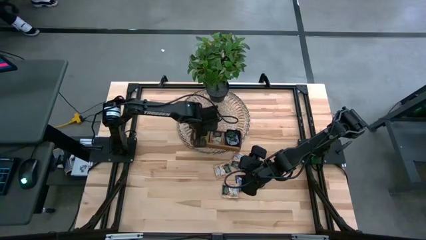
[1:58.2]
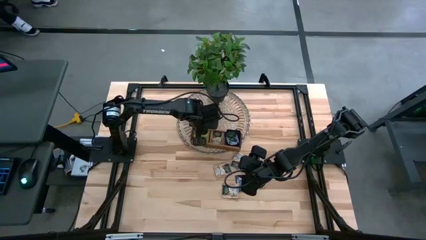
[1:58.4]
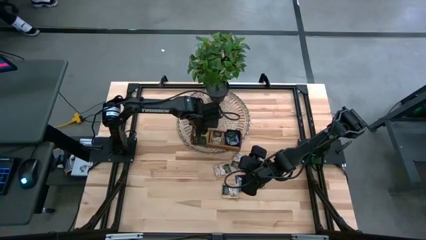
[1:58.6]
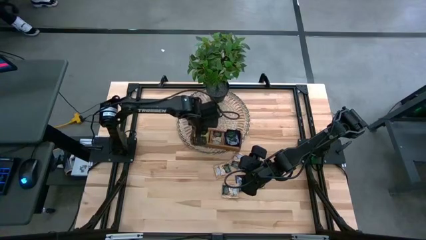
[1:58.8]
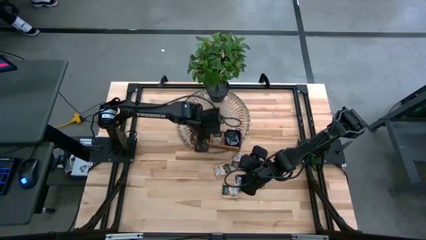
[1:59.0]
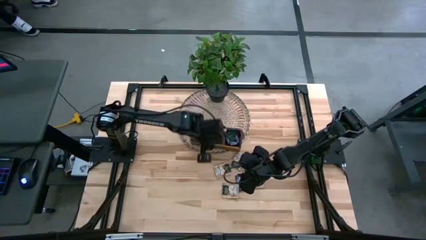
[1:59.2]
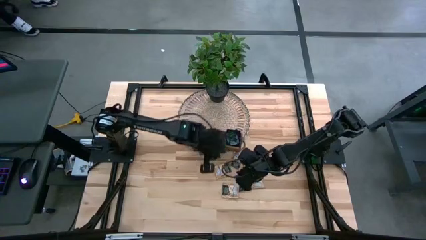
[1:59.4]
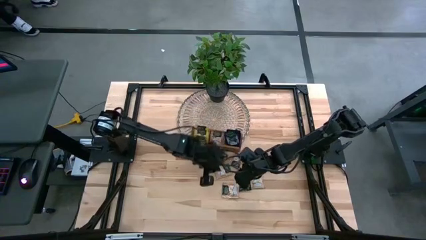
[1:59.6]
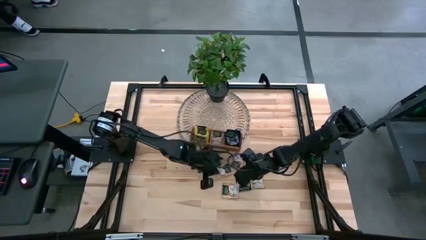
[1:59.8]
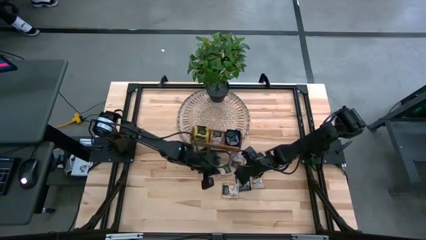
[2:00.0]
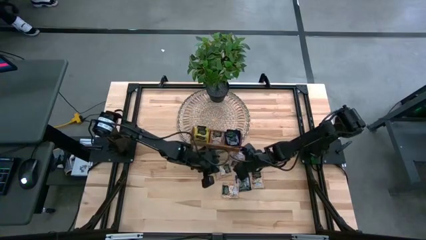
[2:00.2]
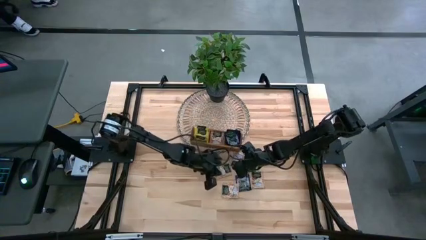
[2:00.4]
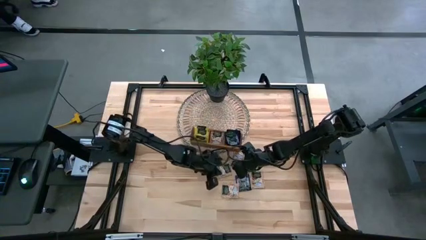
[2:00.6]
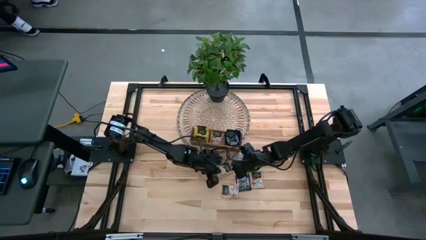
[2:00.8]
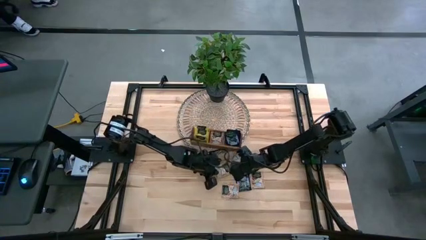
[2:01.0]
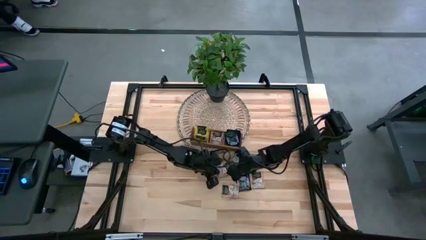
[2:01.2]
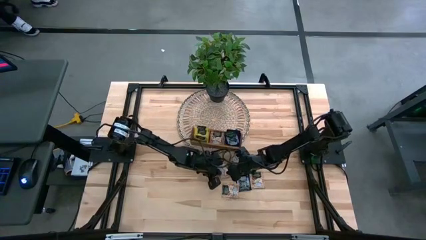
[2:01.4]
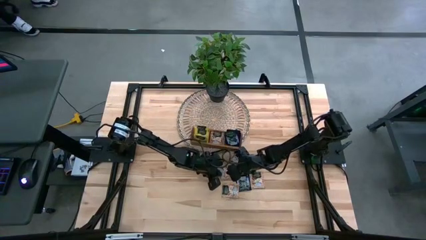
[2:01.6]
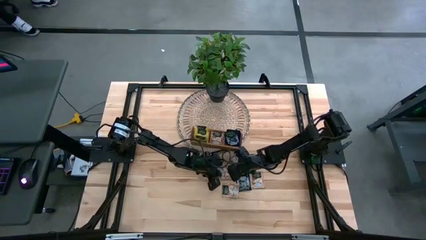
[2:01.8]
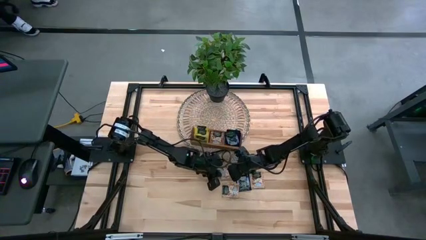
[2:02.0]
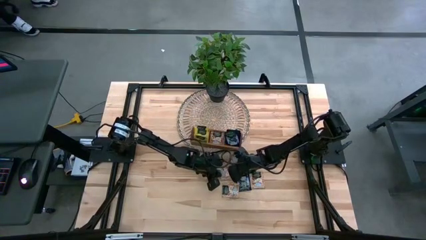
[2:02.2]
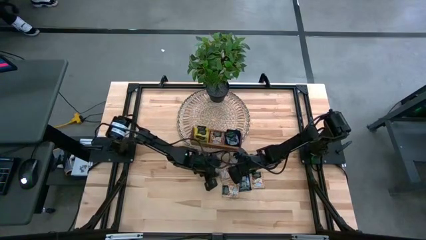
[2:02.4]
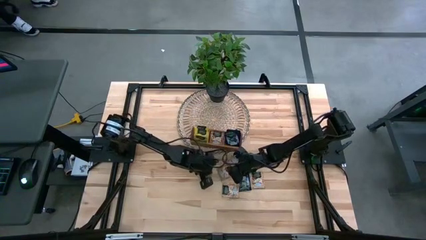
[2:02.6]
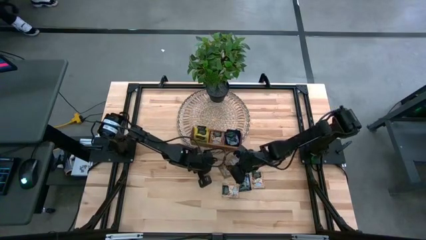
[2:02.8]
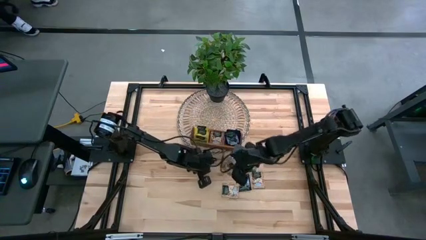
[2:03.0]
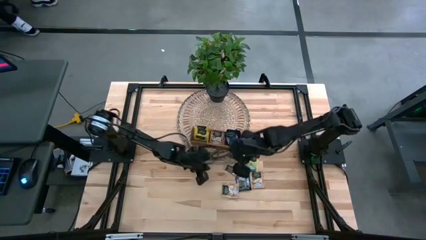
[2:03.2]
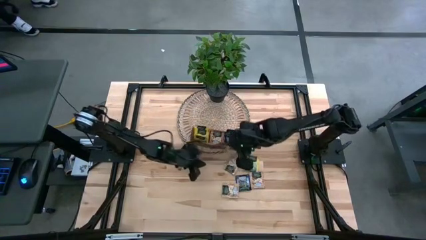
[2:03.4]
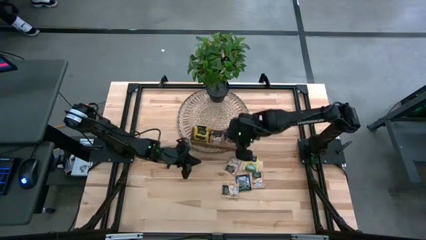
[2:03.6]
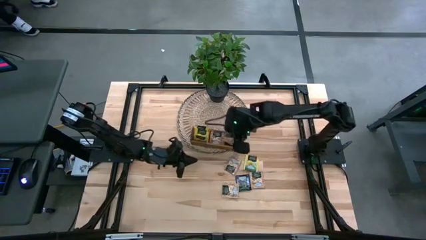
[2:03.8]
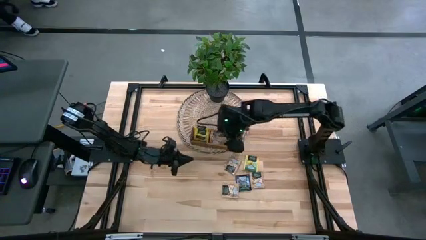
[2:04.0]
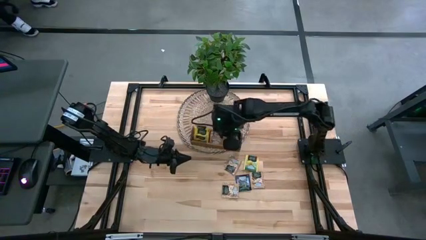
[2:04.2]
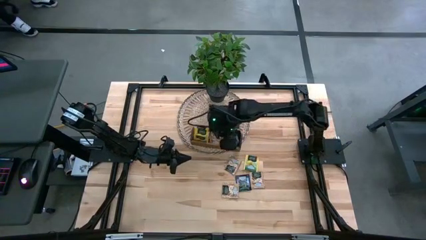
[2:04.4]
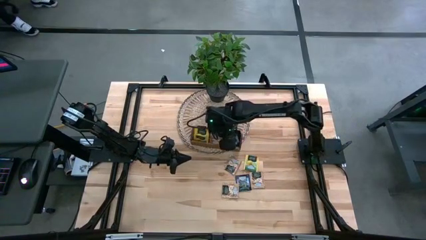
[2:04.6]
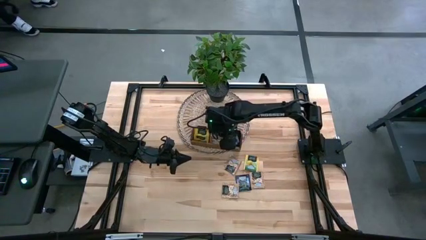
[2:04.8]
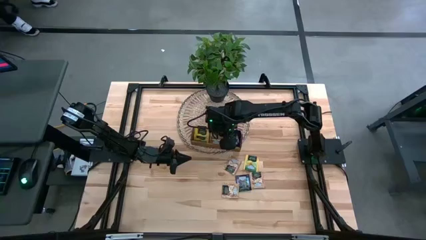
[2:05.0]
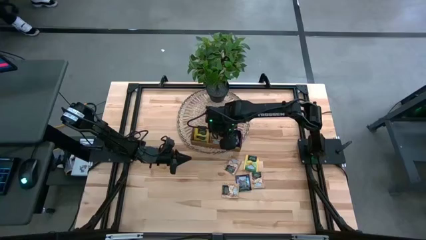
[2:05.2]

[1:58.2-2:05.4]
Task: Pick & Place Tea
Put the brown tea bag into the middle section of the wooden organizer

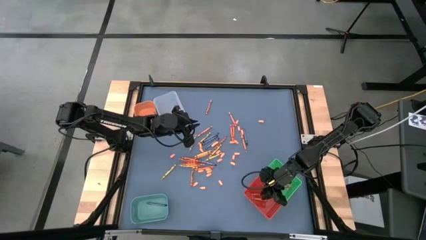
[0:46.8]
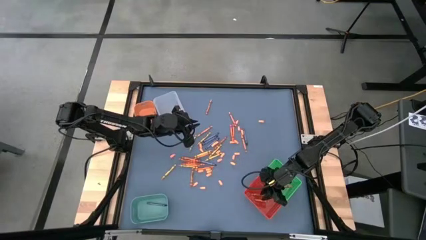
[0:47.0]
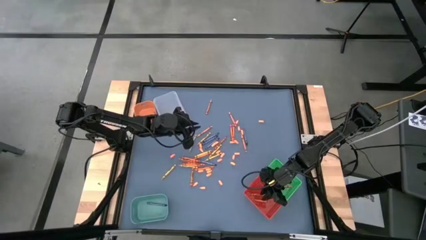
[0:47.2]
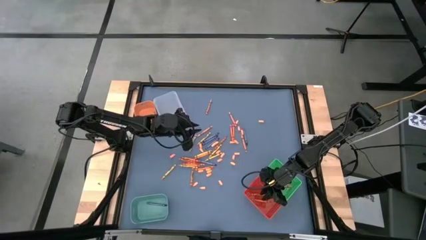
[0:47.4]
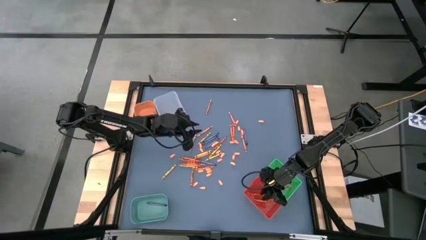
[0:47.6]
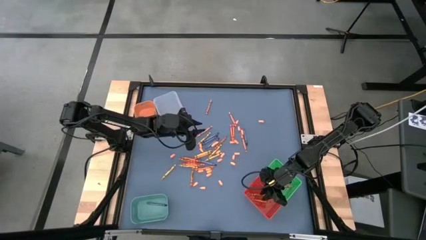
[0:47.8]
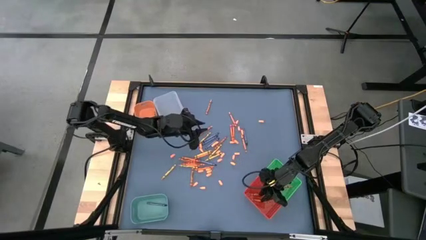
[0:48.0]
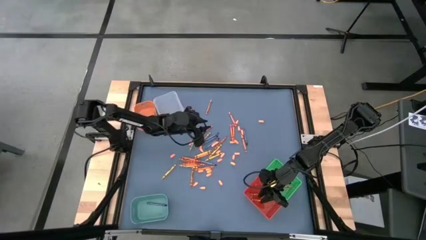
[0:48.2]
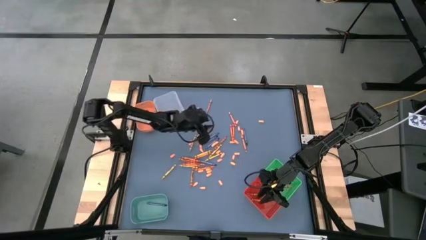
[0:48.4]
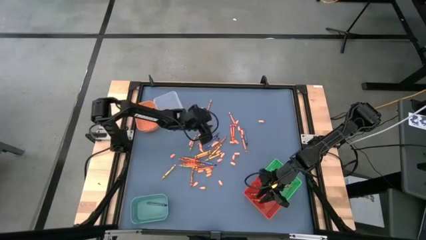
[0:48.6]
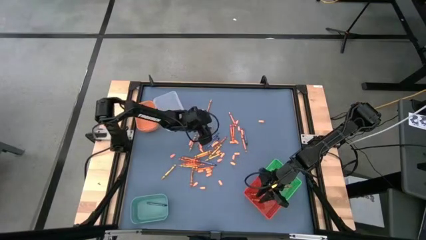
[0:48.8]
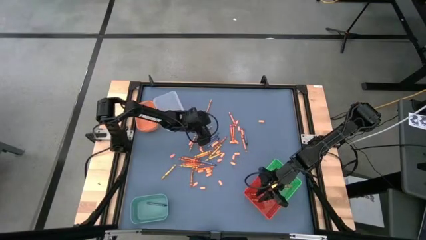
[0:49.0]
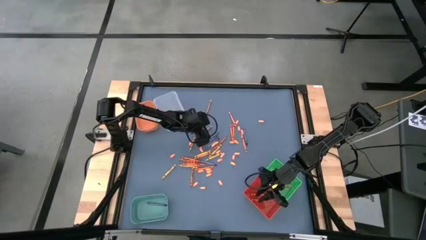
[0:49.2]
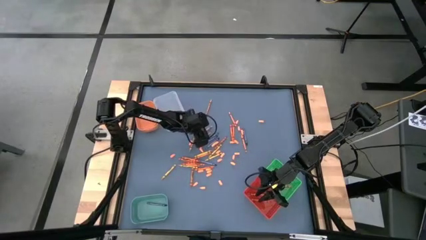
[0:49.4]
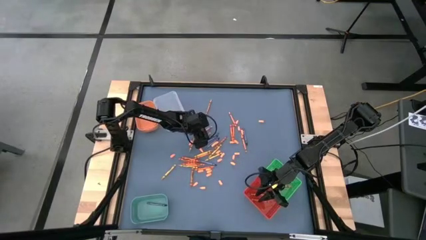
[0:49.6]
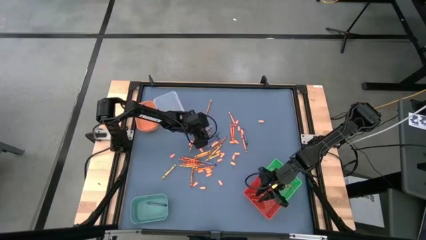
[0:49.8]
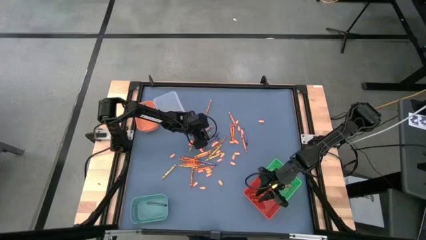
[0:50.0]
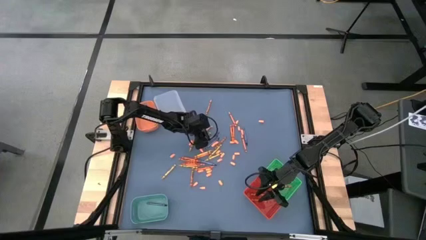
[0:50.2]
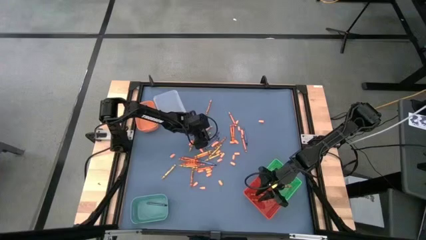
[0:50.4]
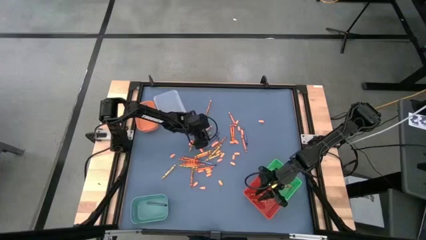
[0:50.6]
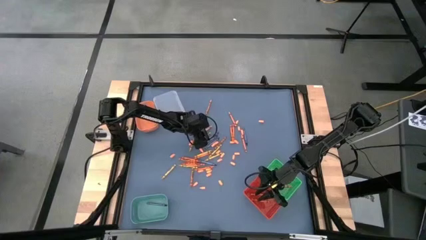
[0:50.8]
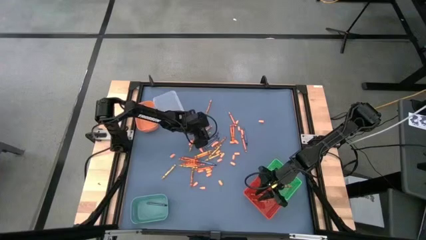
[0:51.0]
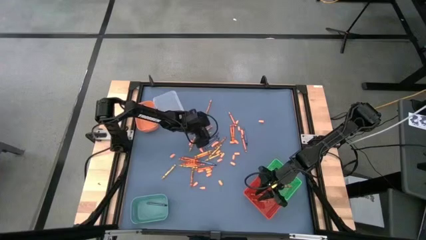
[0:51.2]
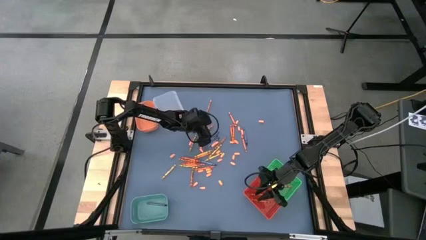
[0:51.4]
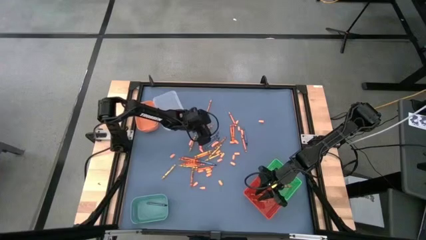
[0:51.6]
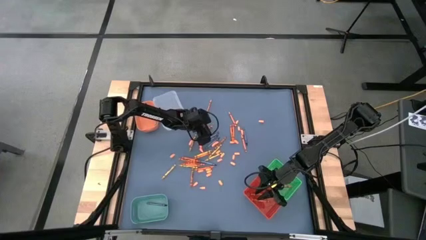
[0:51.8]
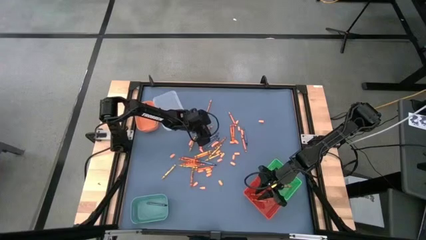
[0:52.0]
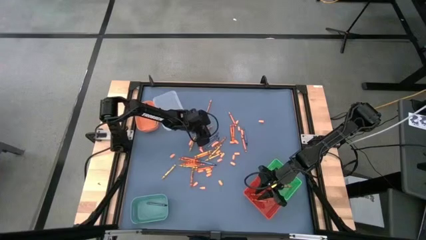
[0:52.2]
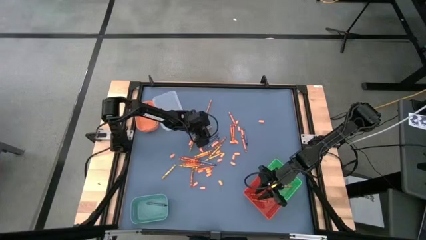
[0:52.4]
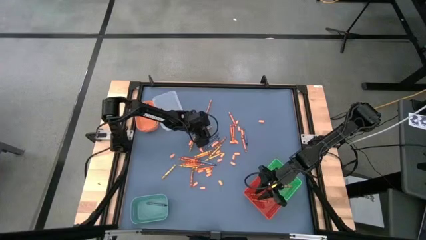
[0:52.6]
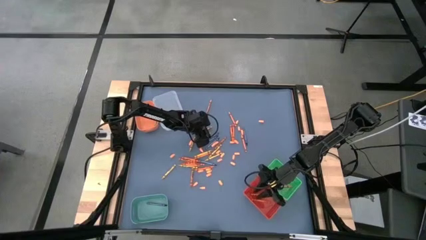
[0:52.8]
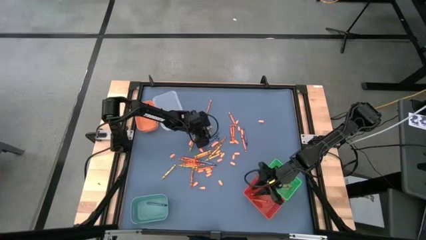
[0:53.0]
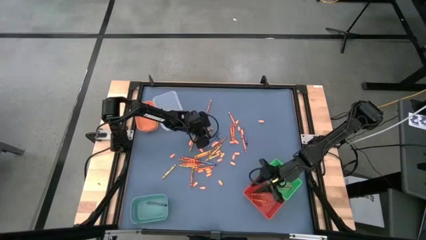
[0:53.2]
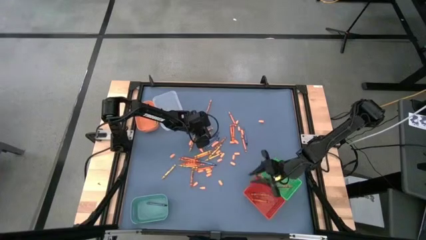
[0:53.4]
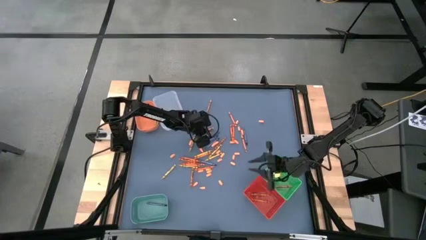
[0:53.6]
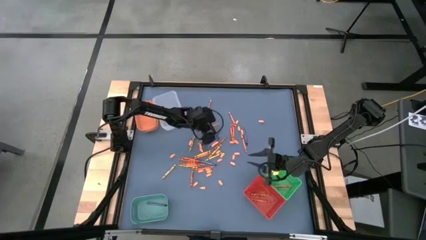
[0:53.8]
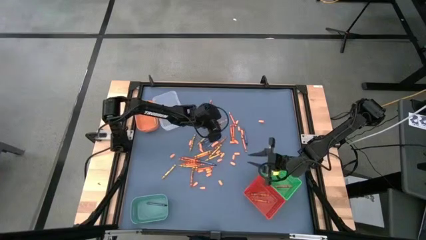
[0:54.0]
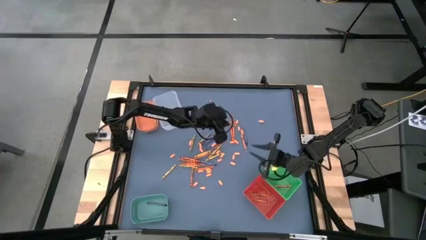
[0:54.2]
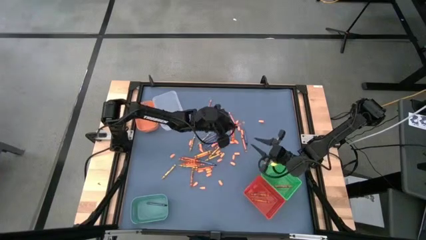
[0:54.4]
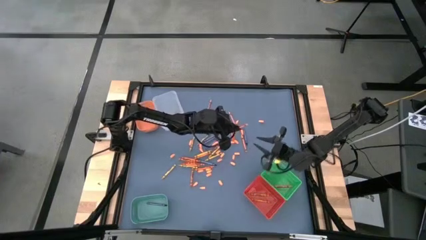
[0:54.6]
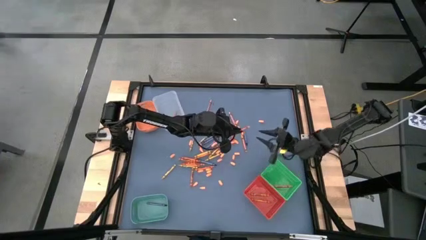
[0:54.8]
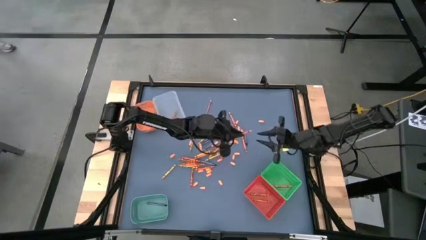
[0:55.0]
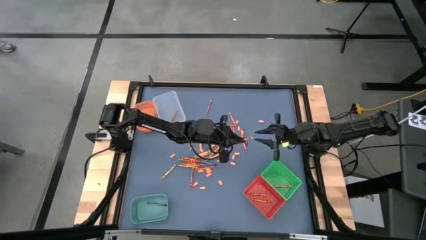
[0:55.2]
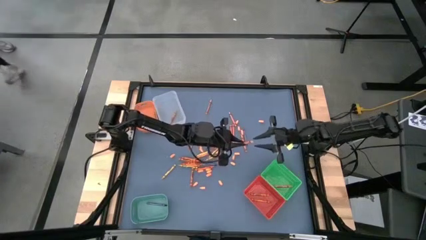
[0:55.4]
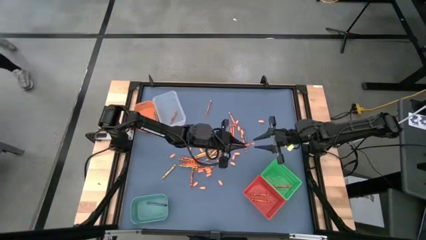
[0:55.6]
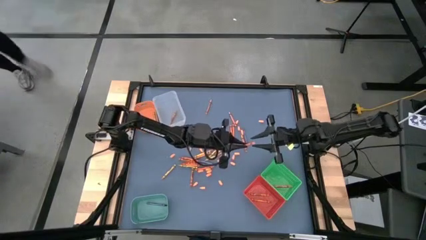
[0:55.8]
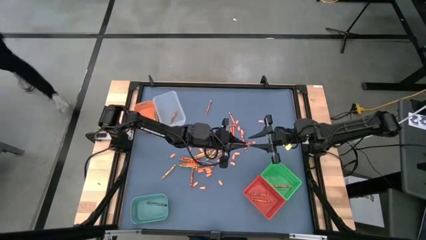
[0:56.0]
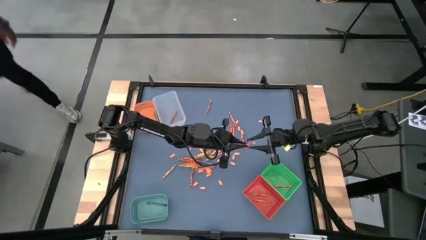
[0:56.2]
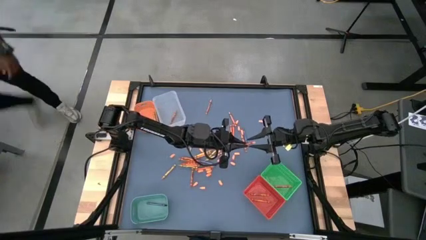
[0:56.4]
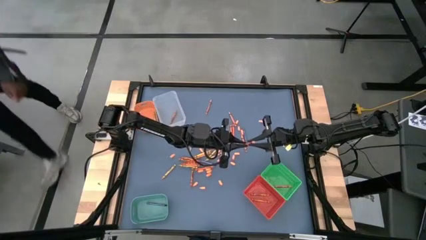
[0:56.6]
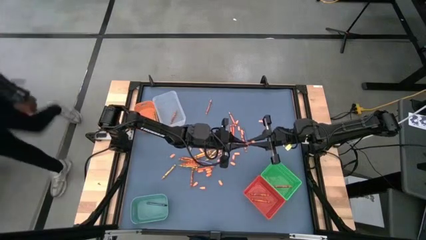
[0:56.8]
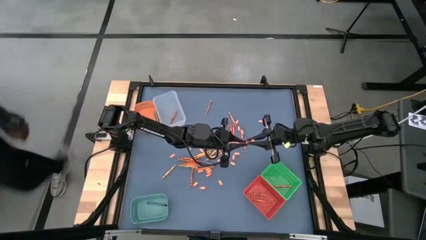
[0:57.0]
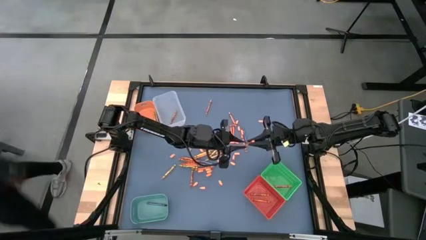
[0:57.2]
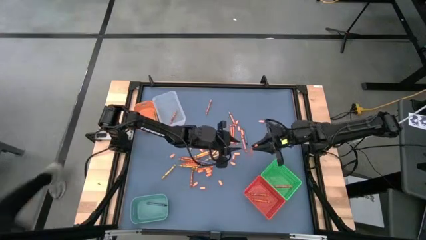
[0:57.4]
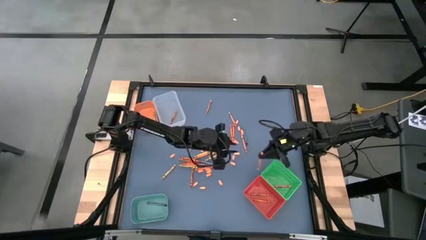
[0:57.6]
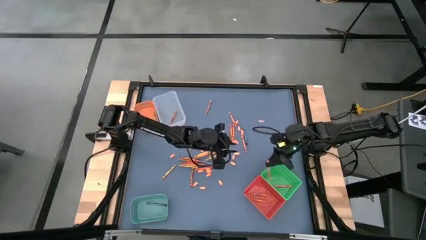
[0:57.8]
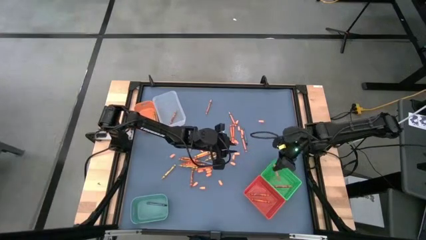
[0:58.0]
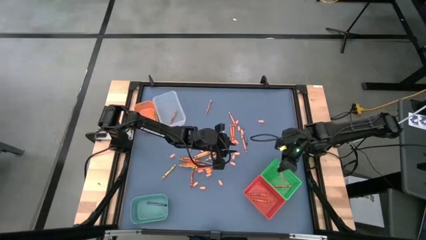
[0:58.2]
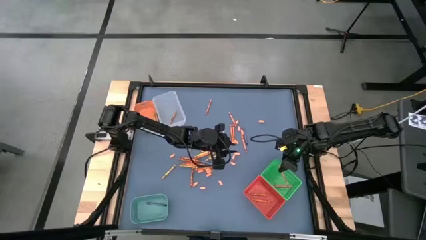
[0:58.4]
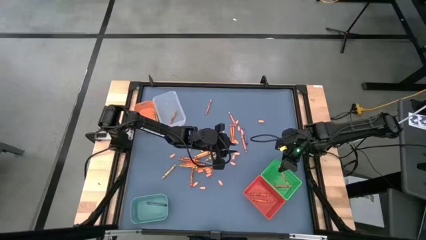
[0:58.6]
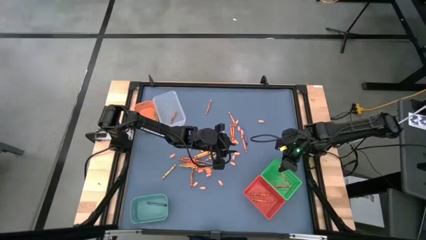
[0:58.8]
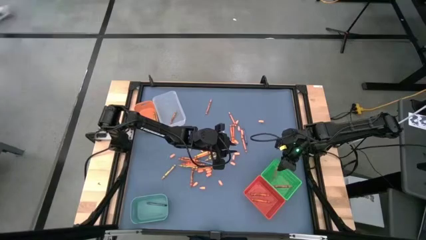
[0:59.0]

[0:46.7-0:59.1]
Task: Sort crayons
Put the light orange crayon into the green bin
